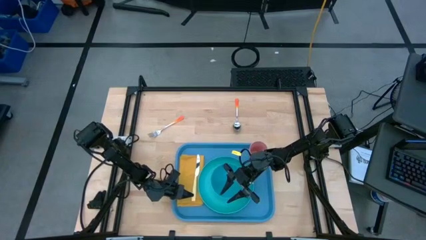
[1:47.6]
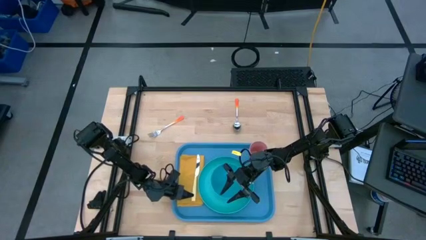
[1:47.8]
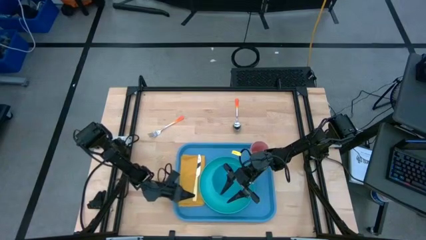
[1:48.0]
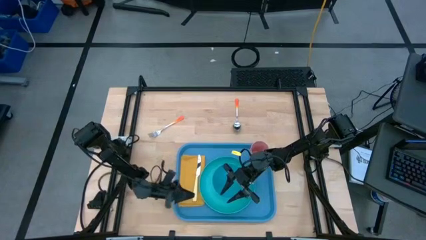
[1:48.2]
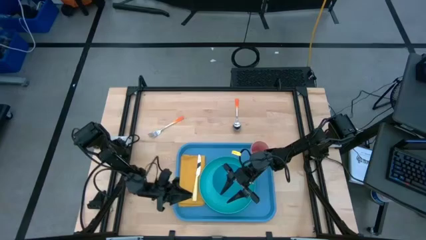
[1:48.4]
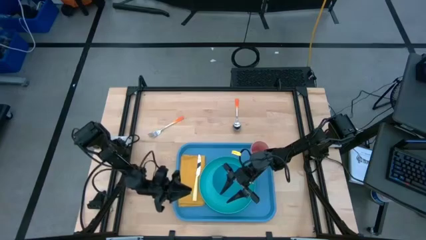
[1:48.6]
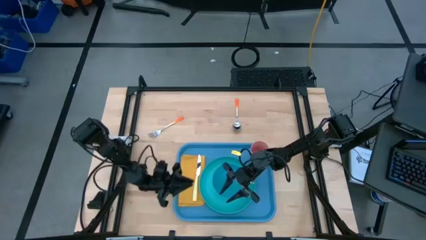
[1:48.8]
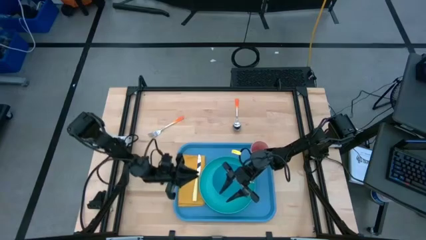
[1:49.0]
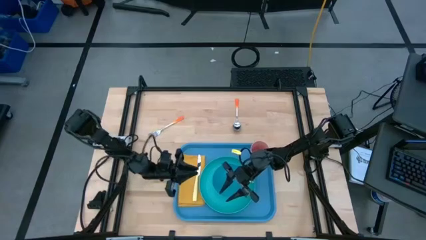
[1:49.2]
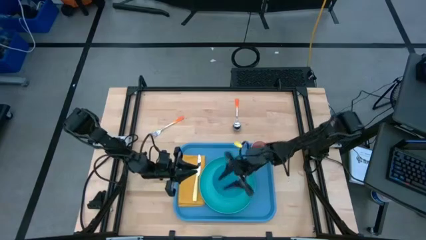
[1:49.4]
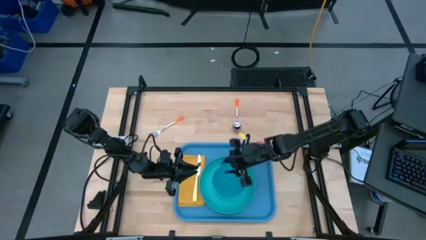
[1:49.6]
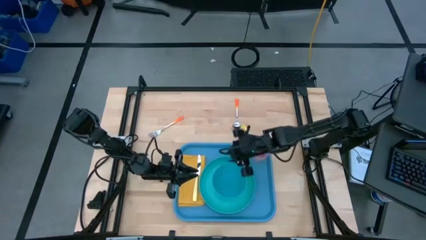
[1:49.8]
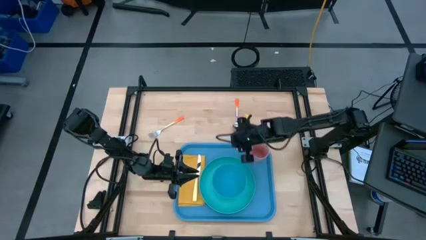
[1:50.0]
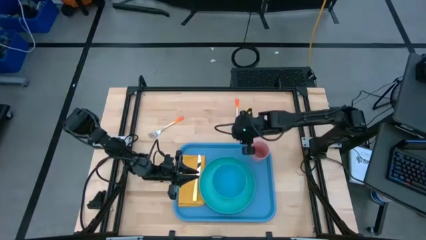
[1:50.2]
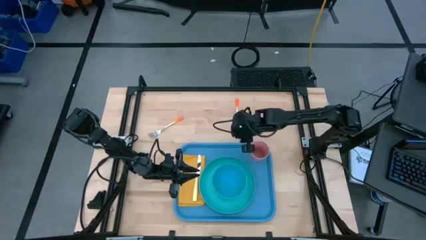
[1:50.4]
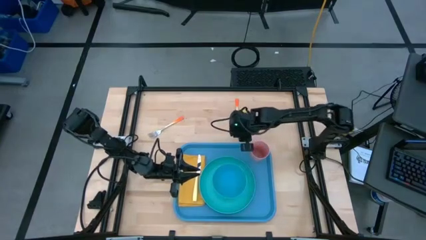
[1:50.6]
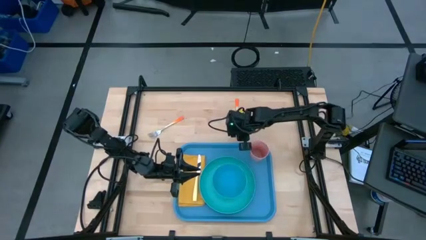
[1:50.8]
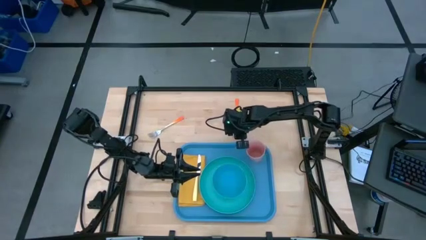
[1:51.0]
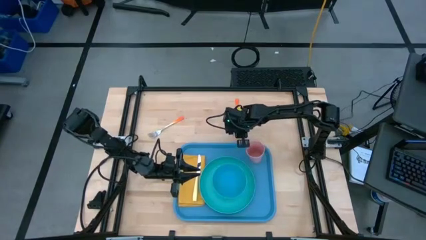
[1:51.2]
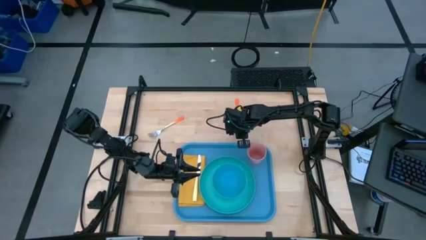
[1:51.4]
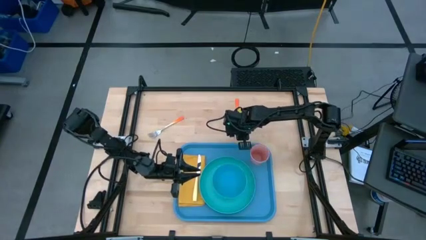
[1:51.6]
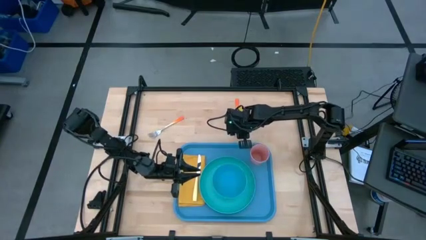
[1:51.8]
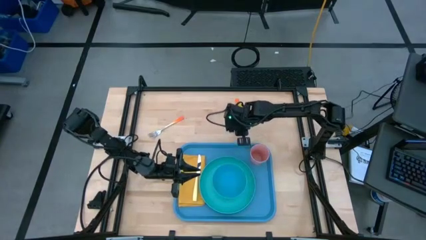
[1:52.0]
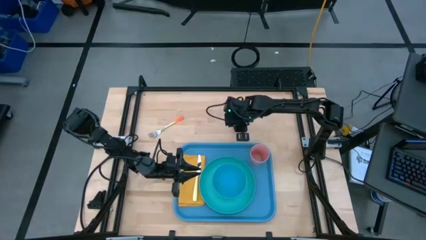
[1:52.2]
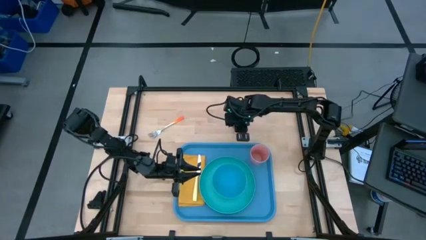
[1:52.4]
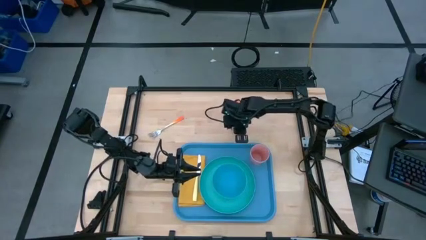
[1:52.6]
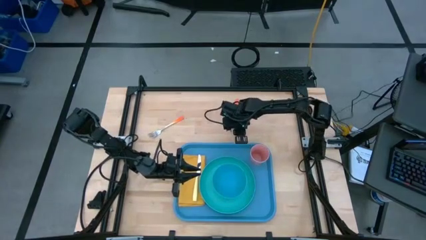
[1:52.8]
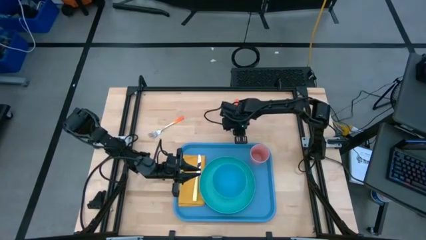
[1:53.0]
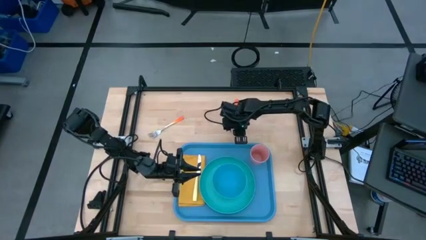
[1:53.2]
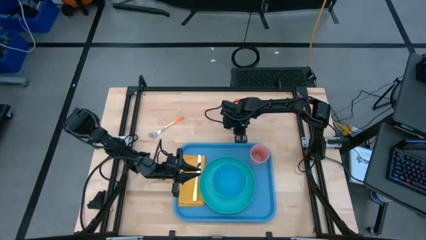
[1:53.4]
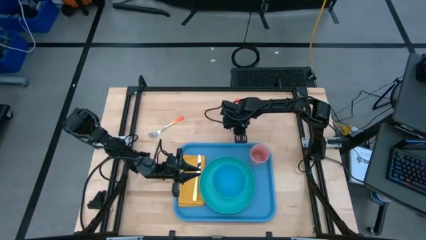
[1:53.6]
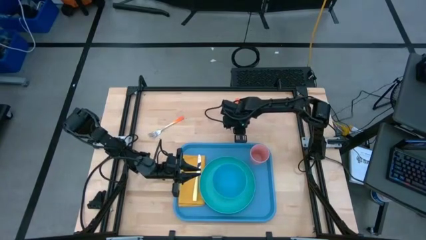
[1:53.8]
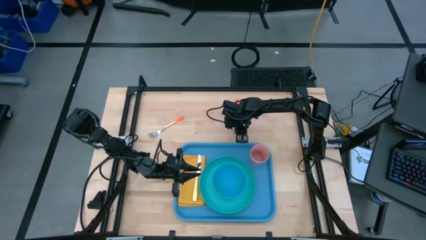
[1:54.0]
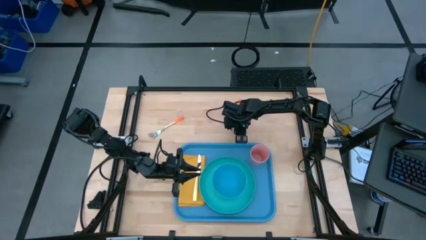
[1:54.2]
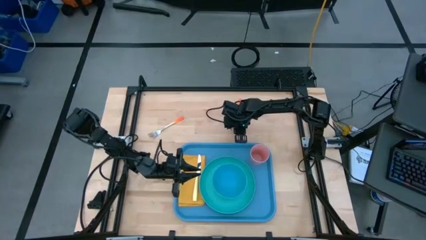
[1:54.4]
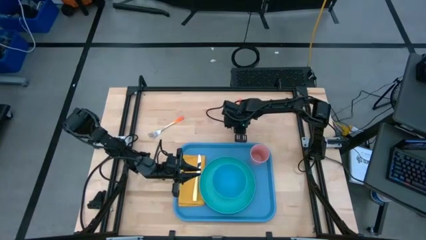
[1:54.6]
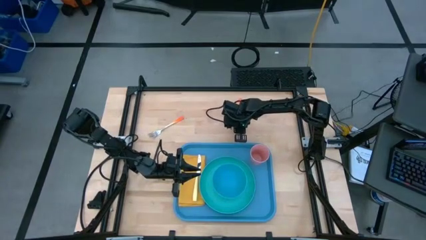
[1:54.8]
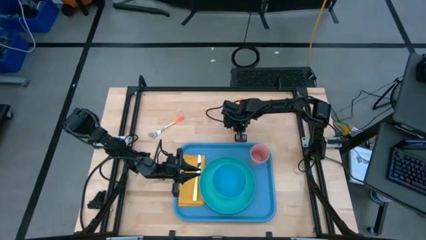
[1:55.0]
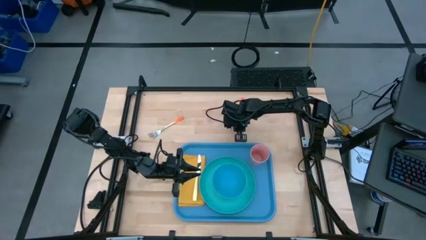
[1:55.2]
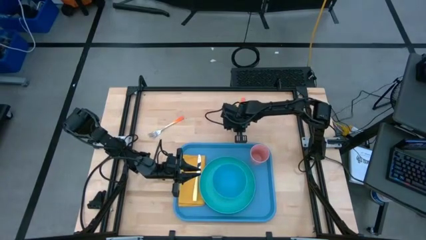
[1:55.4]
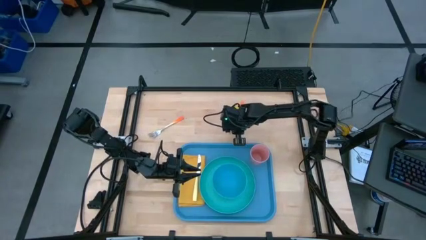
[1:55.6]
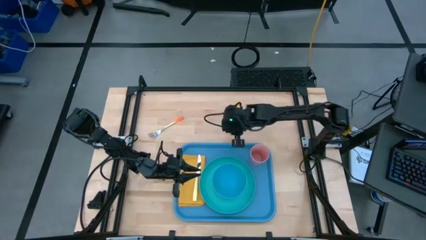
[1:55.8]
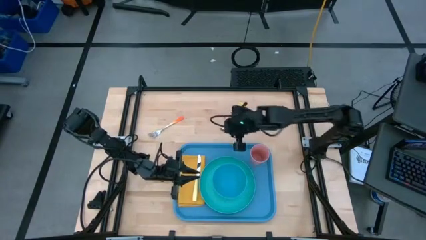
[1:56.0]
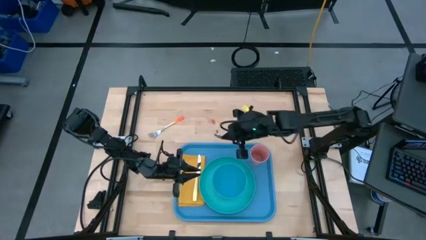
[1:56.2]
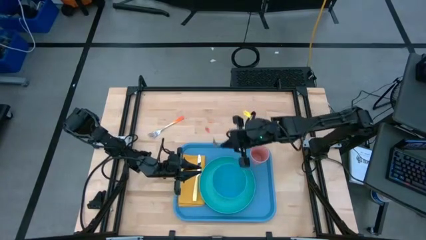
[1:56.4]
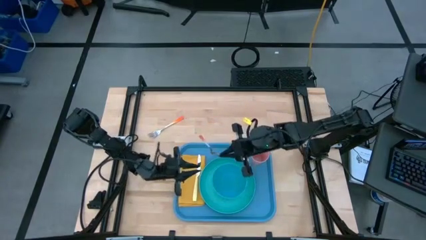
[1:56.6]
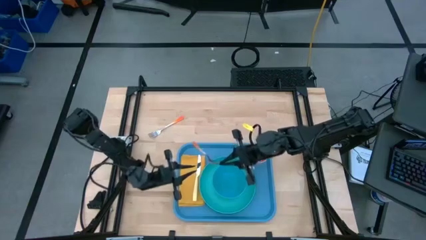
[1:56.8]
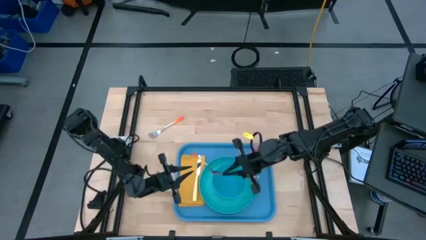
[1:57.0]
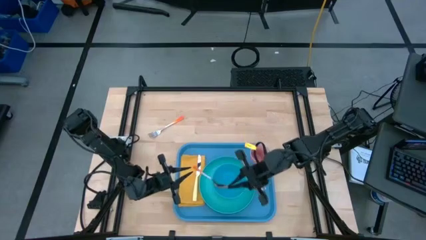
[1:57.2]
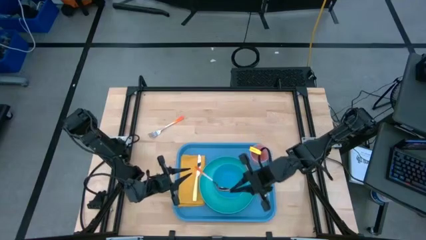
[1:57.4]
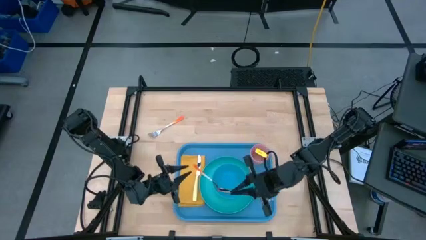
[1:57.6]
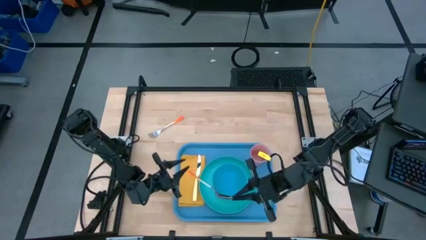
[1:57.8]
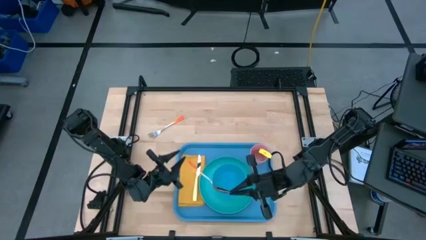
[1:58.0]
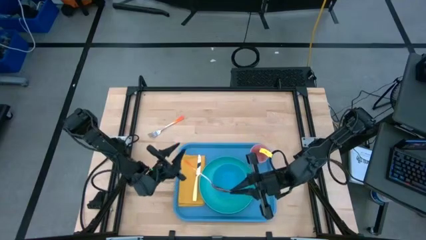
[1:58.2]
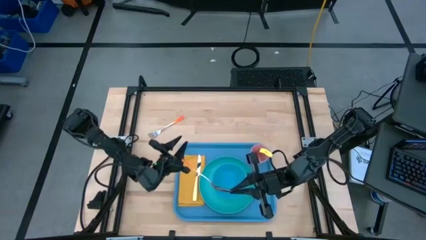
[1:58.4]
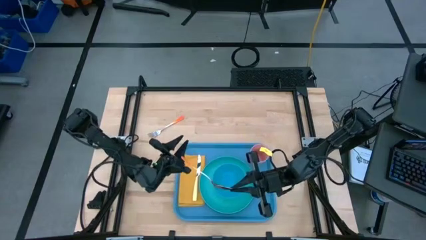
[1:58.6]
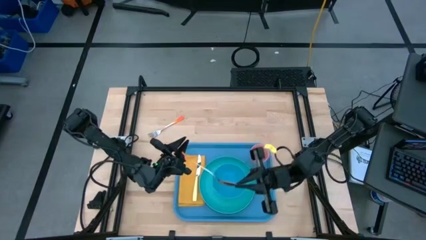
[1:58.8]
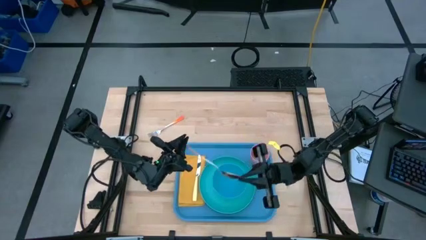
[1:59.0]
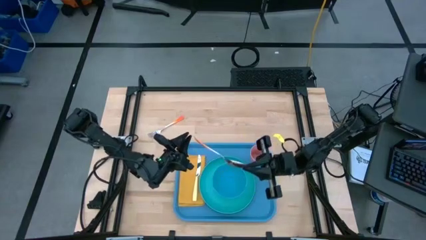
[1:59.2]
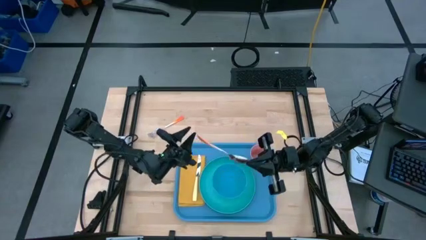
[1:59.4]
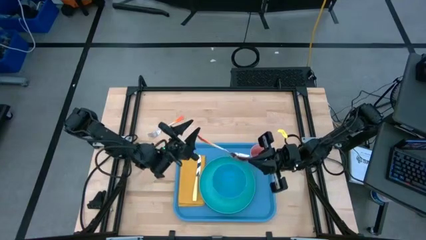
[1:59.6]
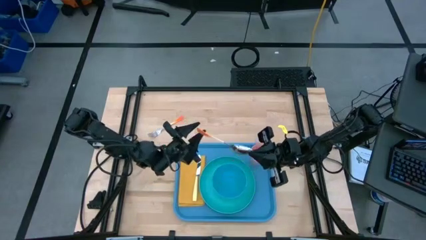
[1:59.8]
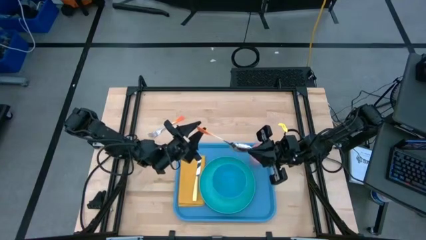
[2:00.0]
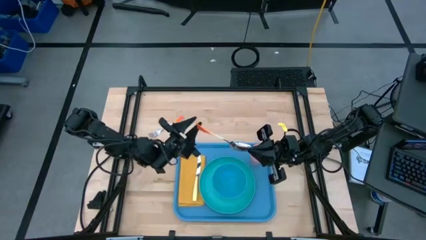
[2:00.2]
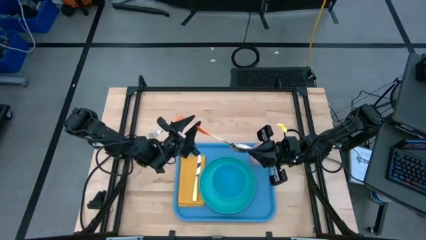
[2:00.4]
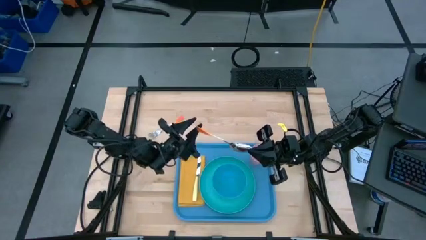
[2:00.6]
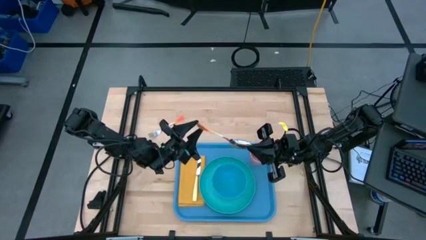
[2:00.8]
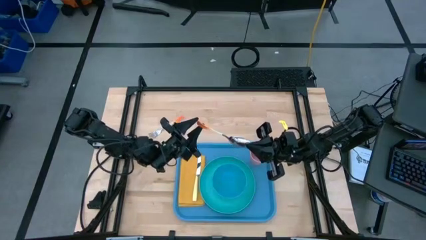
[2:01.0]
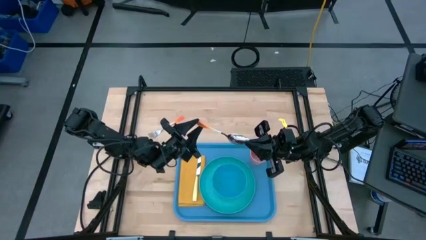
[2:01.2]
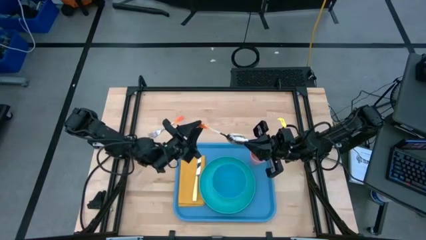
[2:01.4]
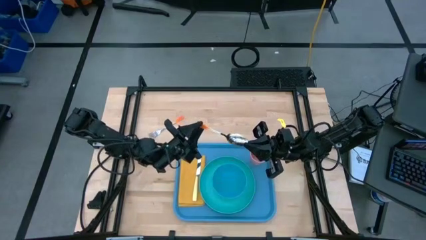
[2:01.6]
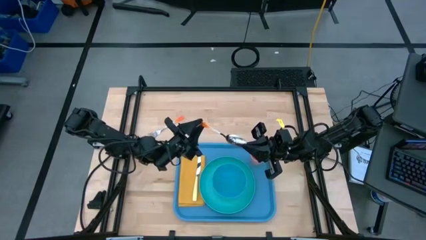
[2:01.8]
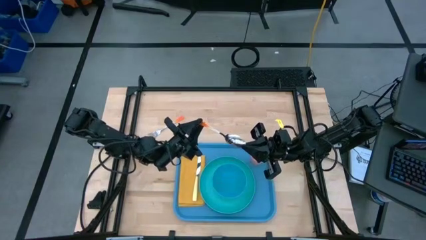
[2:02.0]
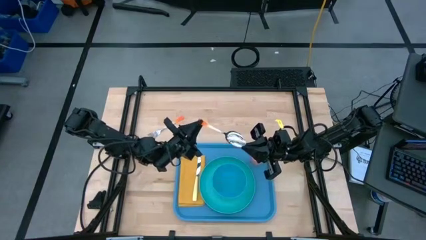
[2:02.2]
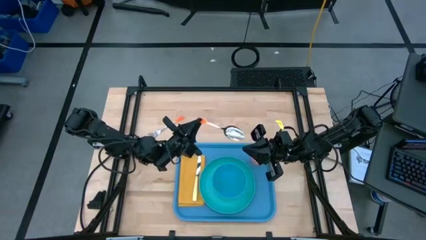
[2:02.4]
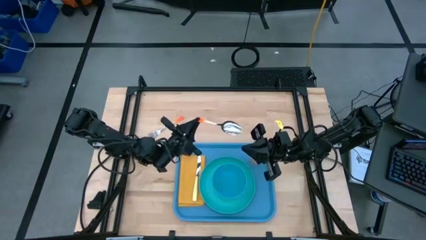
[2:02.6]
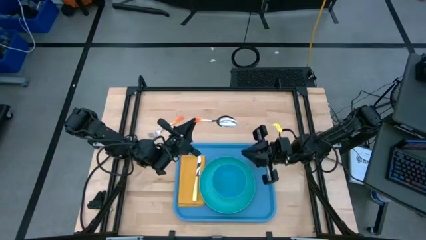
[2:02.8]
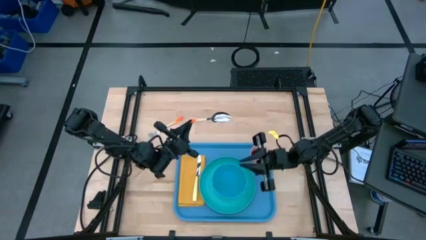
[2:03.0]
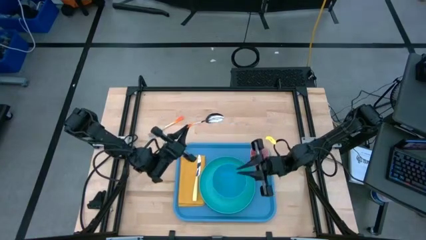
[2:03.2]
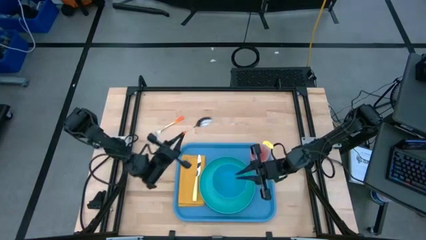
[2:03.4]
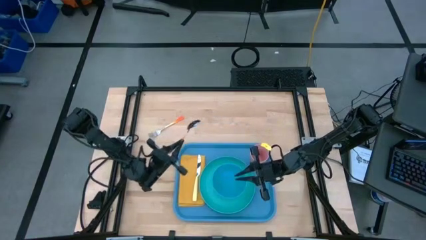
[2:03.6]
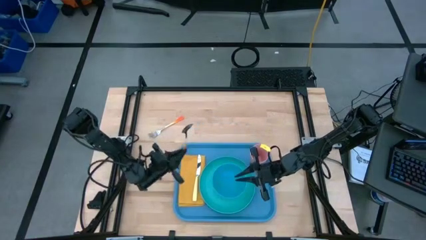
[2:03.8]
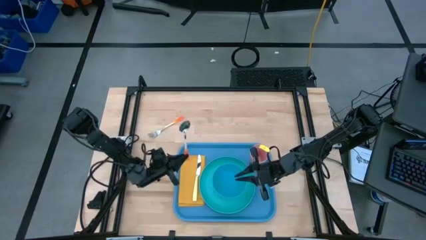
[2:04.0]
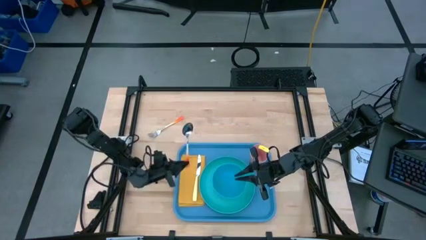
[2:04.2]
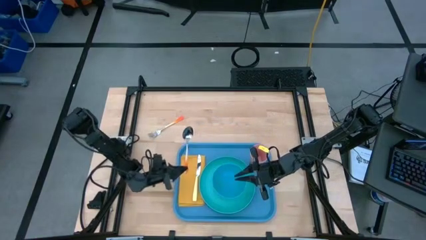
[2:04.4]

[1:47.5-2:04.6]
Task: Set up tray
Put the orange spoon on top of the yellow napkin to the left of the yellow knife
